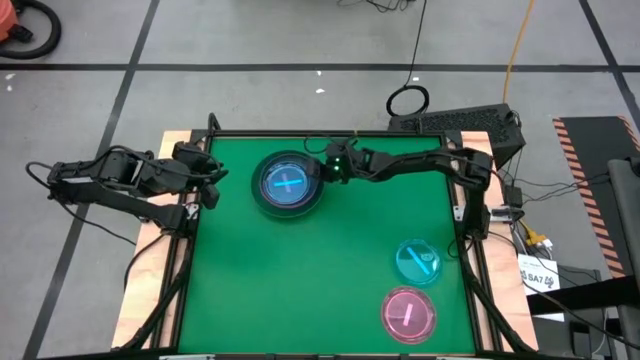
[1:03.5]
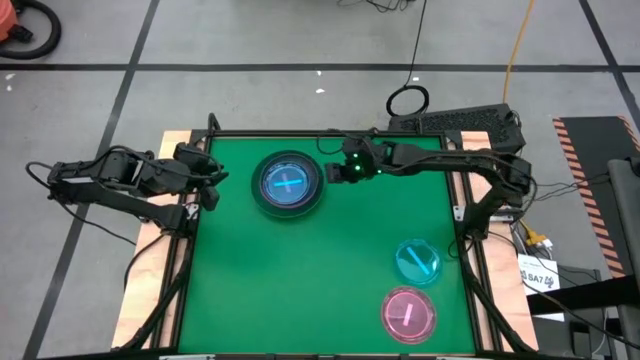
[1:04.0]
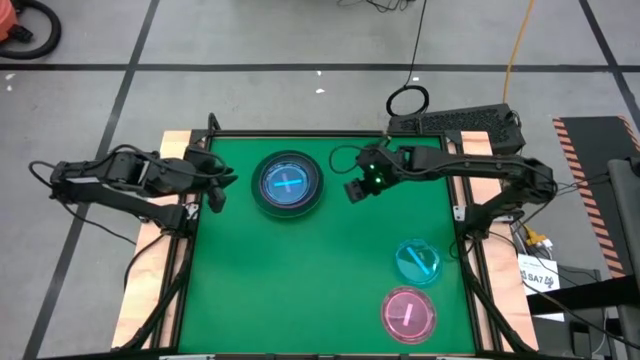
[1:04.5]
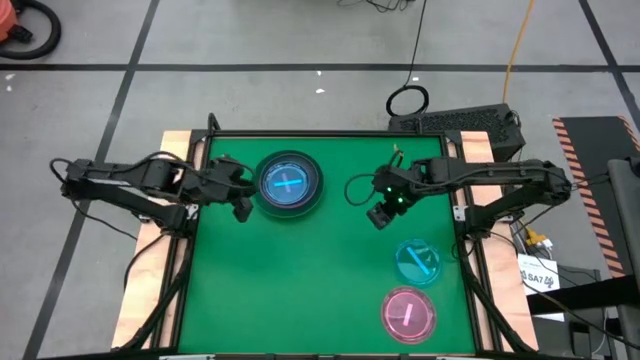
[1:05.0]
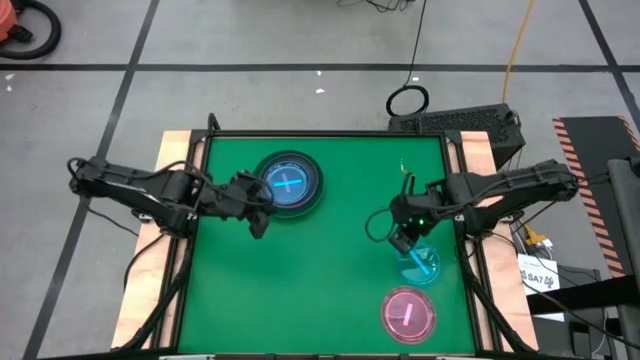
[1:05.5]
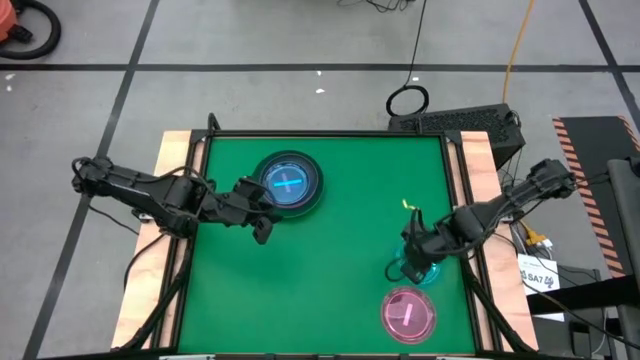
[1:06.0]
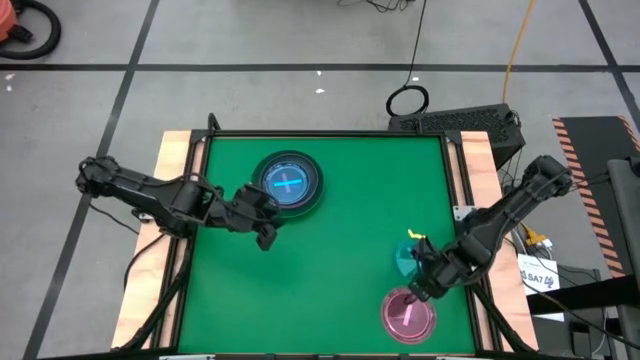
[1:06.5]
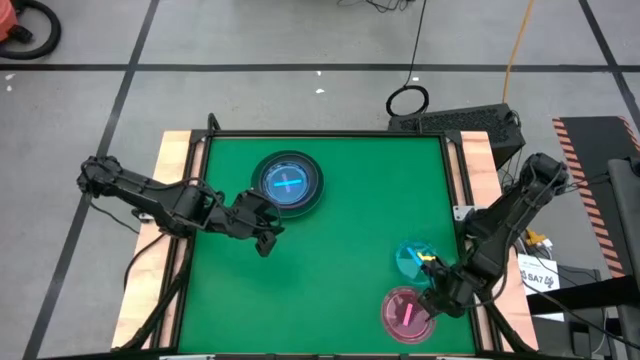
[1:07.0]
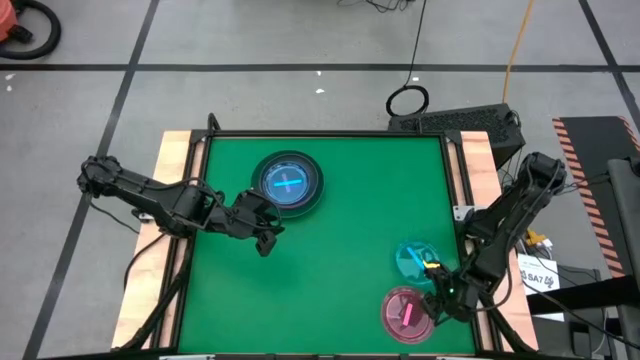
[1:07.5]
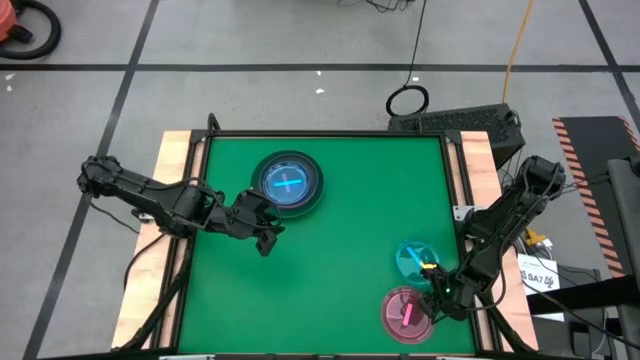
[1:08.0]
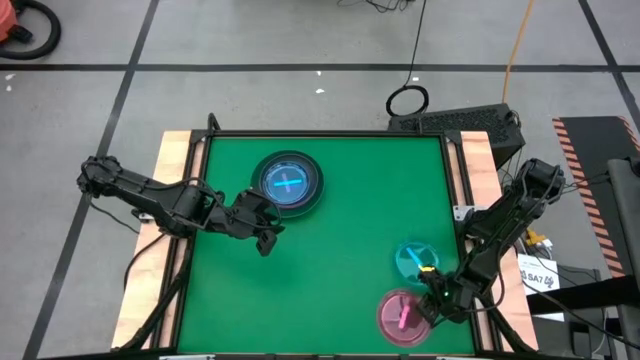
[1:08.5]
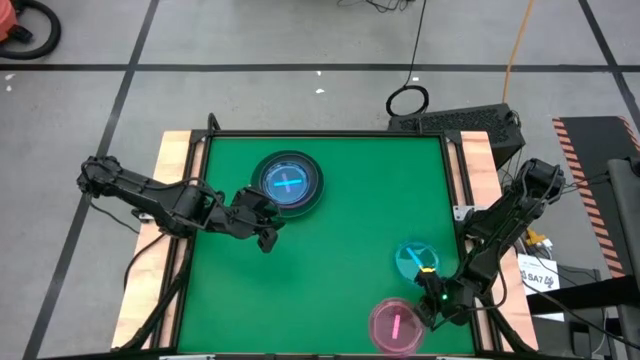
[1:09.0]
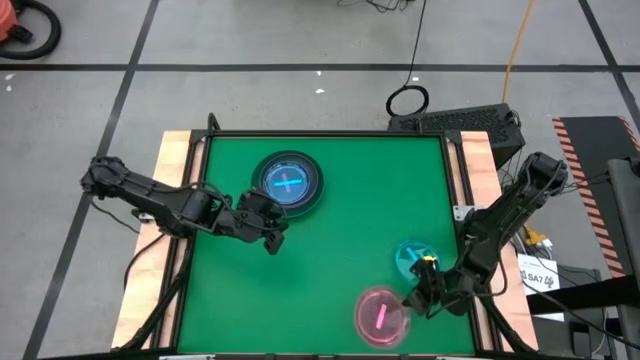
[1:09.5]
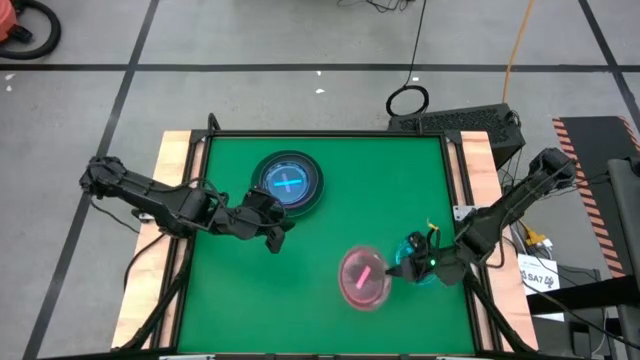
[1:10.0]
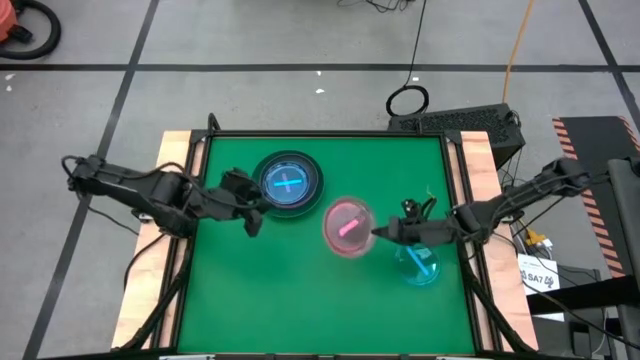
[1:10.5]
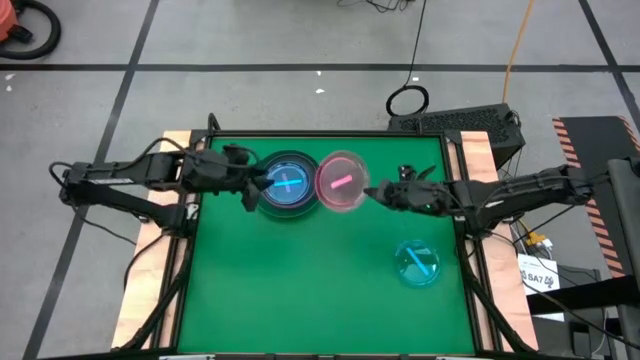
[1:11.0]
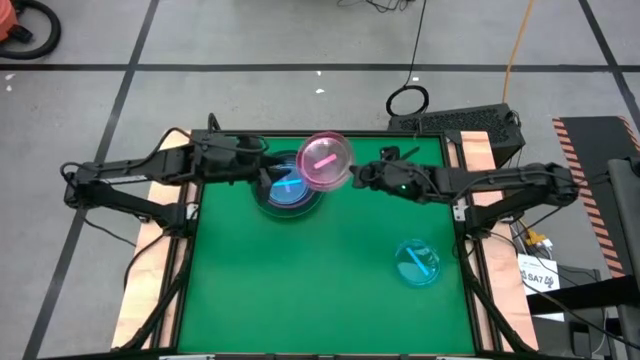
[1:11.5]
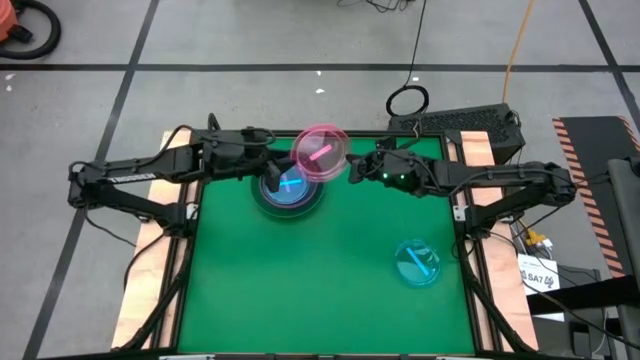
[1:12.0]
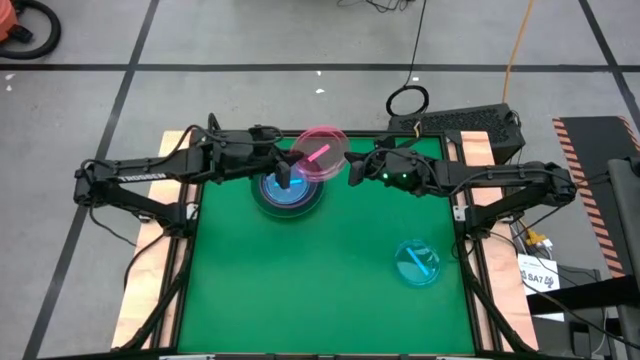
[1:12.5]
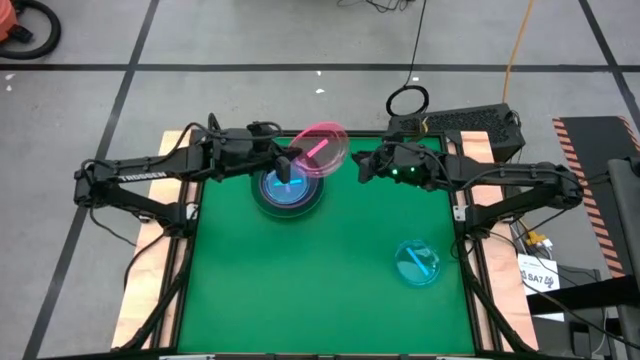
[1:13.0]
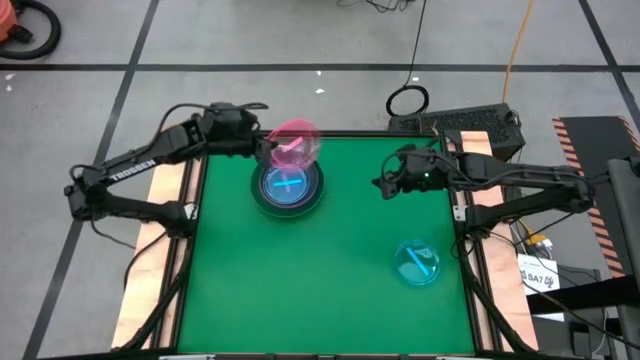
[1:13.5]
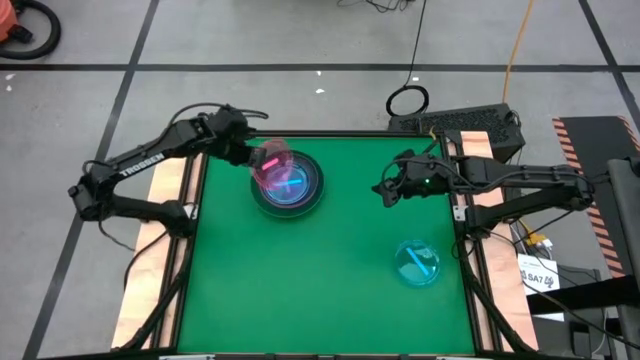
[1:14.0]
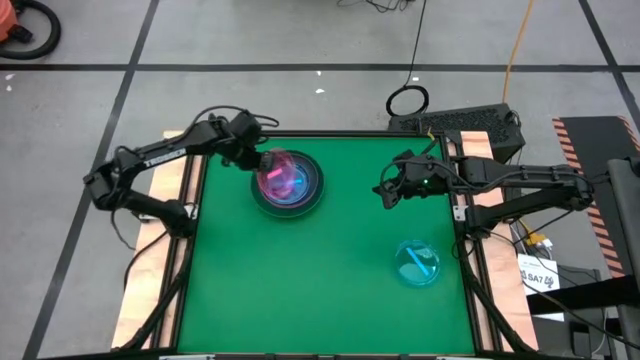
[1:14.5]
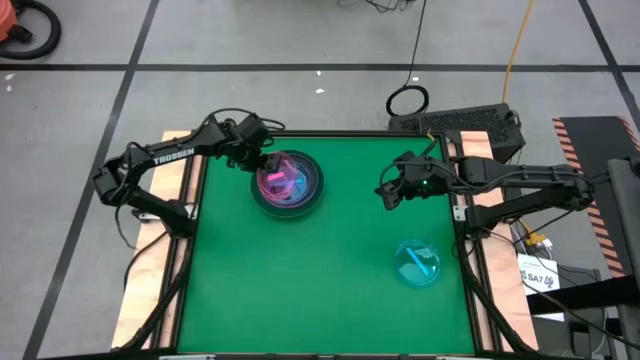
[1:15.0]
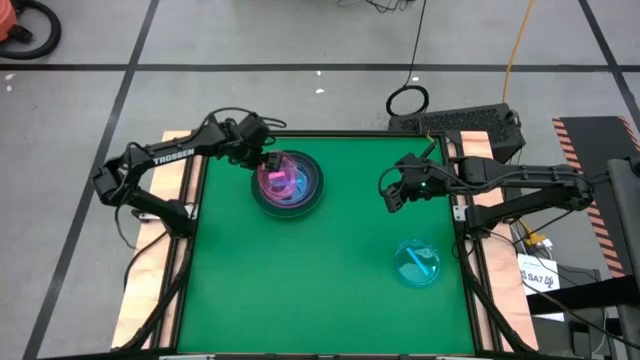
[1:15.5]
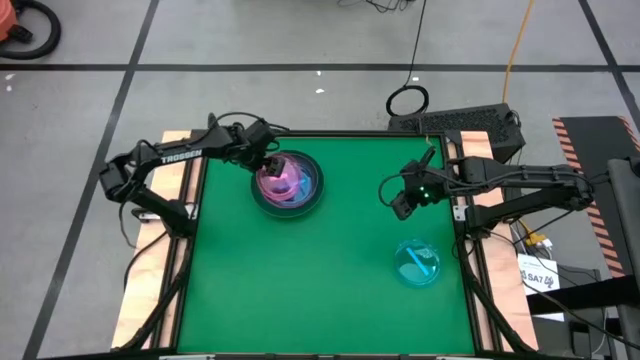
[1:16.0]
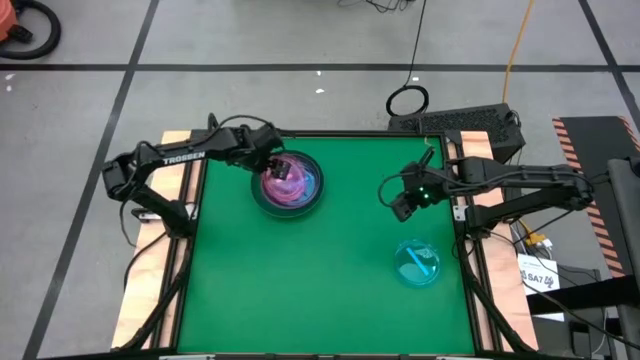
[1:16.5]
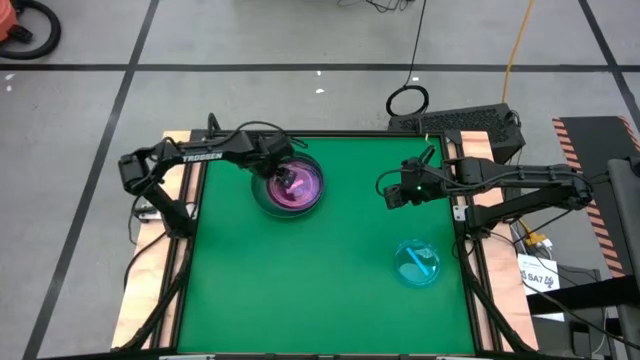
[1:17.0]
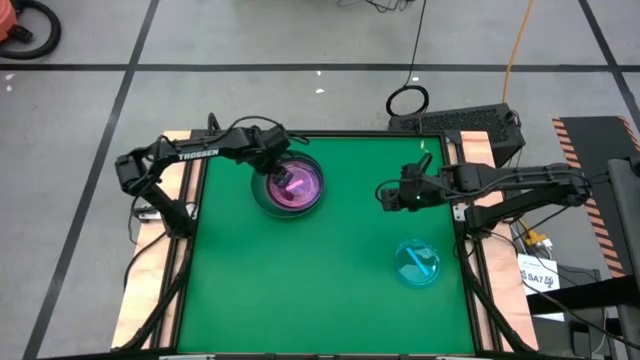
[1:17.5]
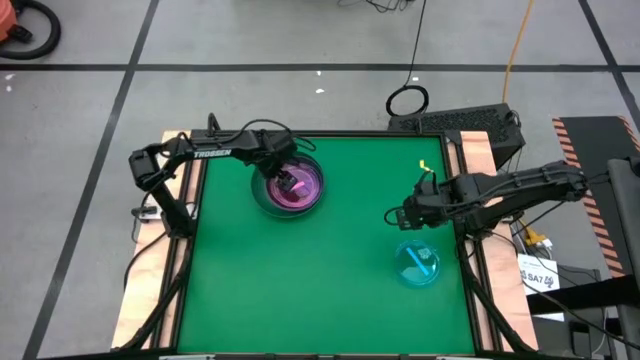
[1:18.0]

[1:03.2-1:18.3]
Task: Stack plastic plates
Stack the pink plate on the blue plate

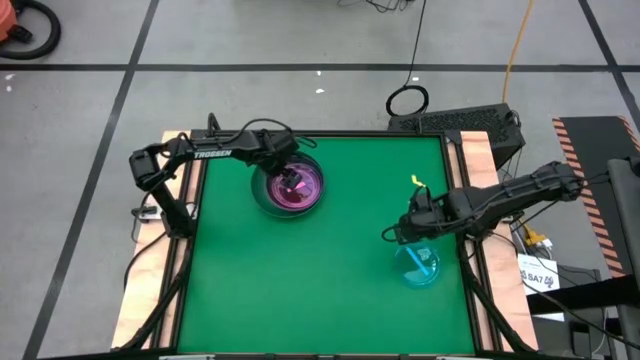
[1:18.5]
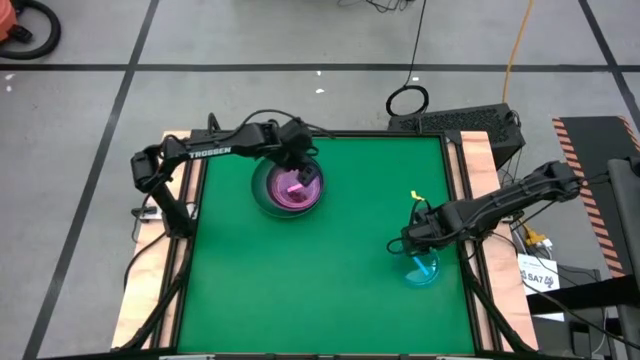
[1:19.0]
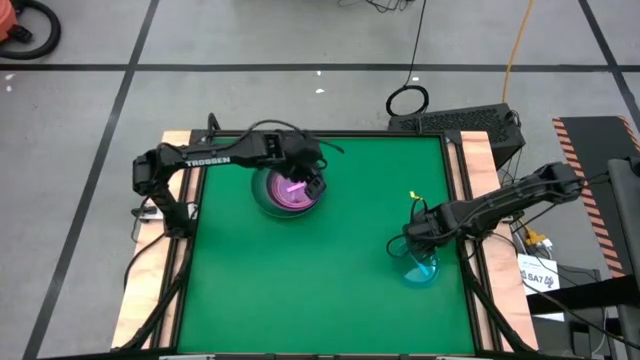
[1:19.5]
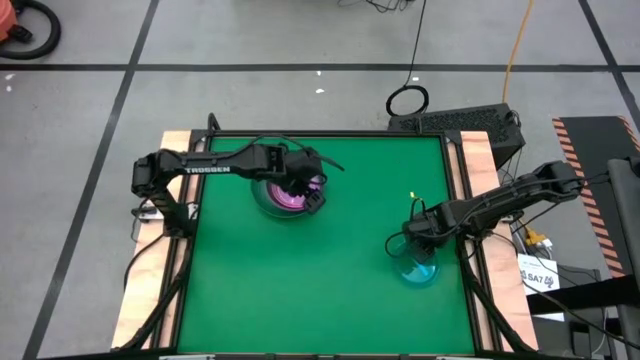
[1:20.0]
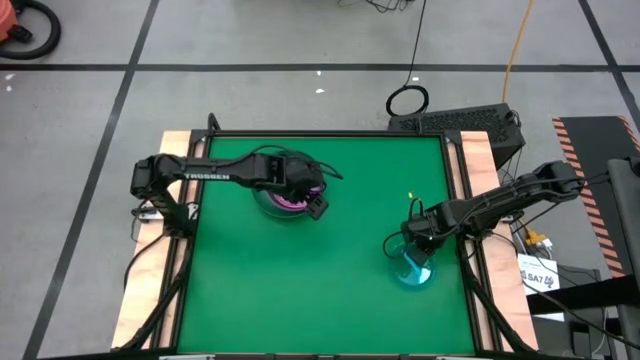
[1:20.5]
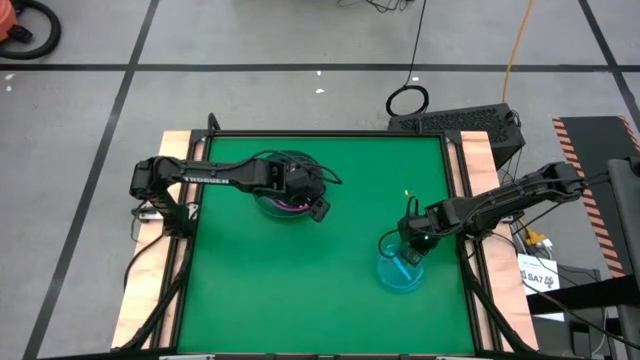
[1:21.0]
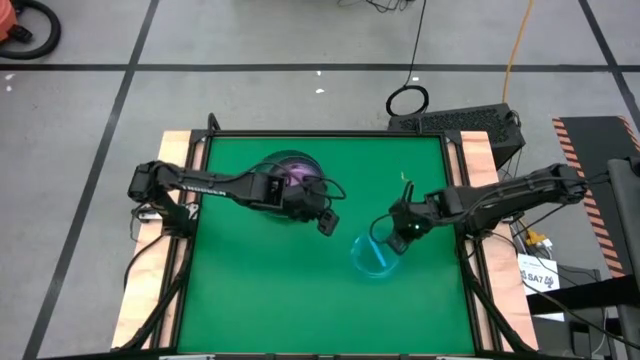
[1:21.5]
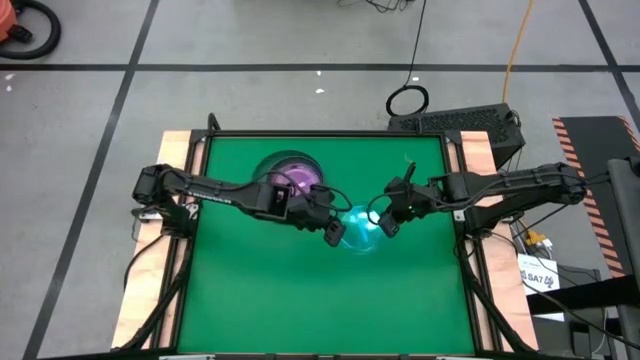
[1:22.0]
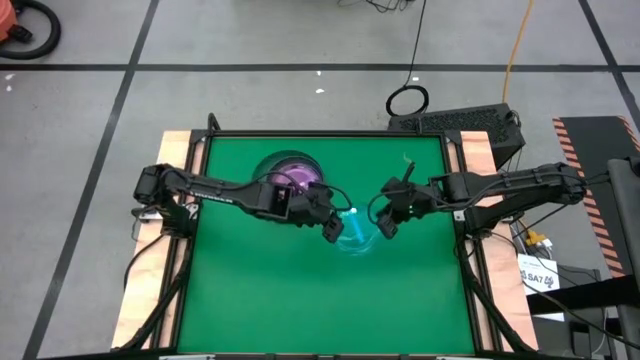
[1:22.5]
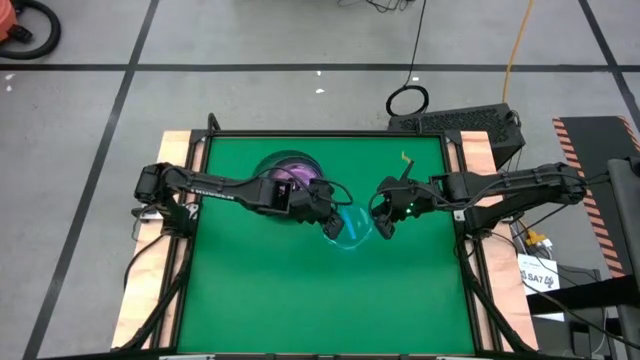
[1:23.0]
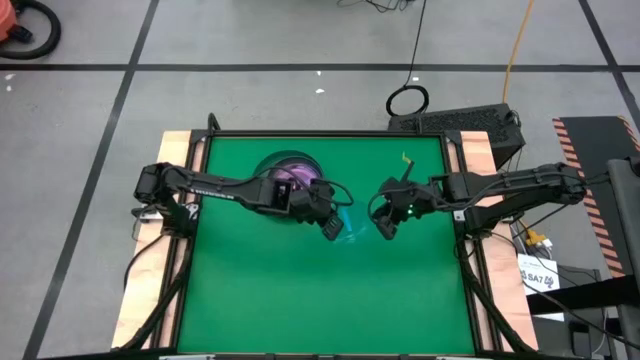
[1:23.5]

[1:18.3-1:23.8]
Stack the blue plate on the pink plate

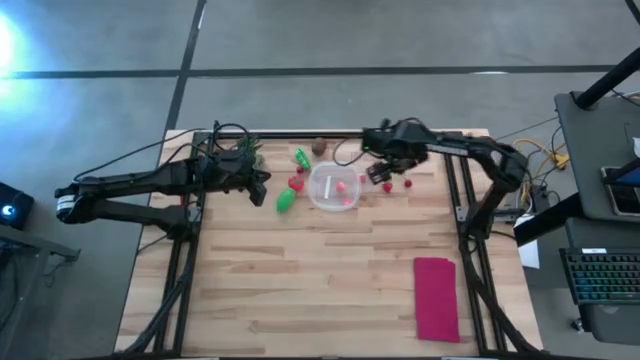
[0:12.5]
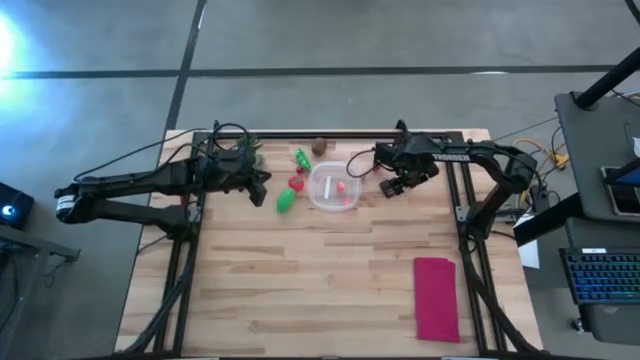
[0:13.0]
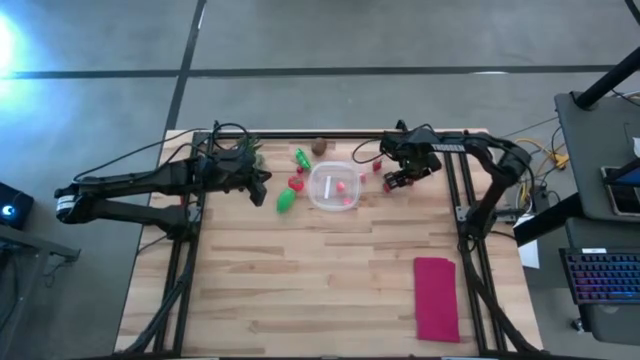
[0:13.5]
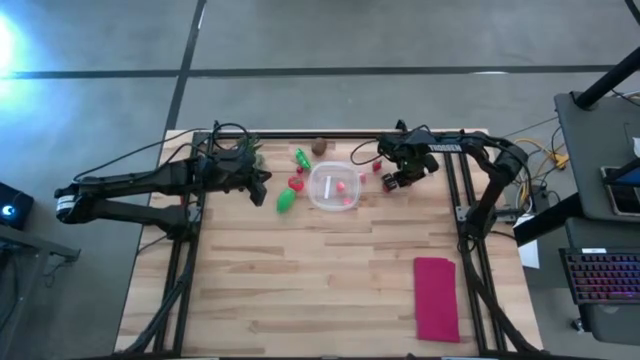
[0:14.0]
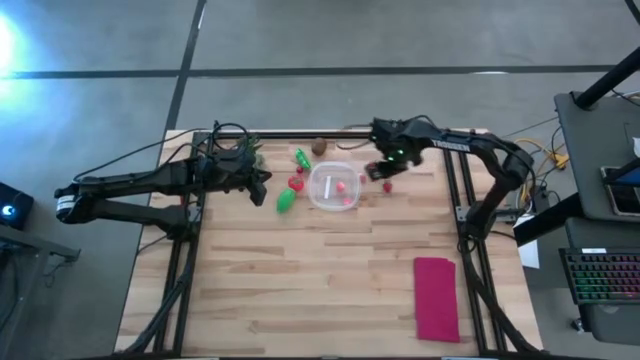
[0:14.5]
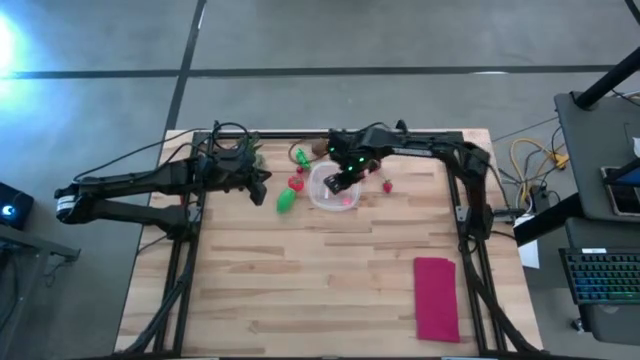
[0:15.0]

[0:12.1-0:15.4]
Task: Pick and placing Produce into tupperware
Put the right cherry into the transparent bin
